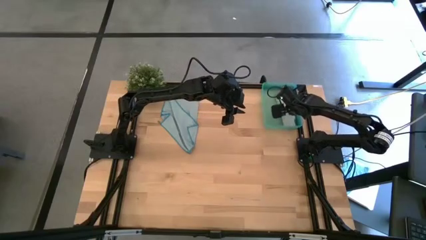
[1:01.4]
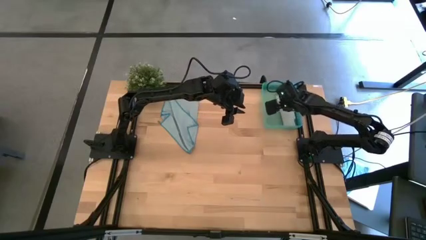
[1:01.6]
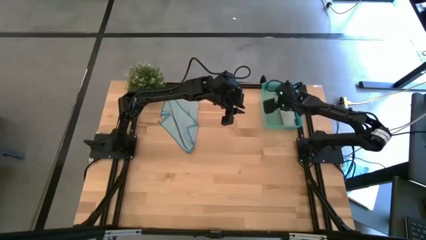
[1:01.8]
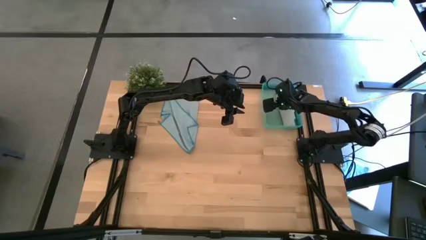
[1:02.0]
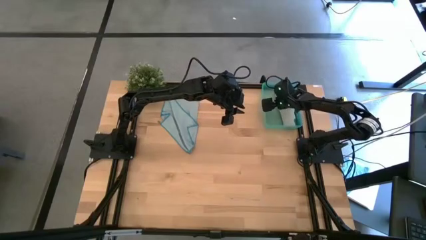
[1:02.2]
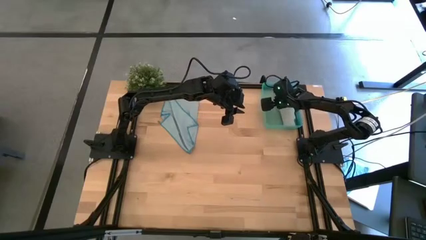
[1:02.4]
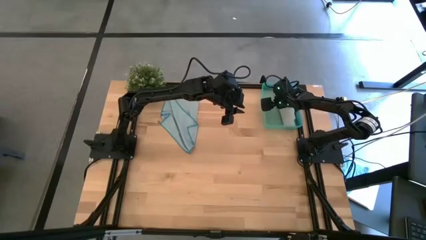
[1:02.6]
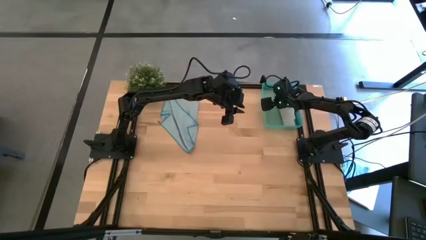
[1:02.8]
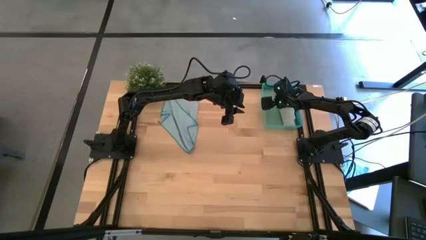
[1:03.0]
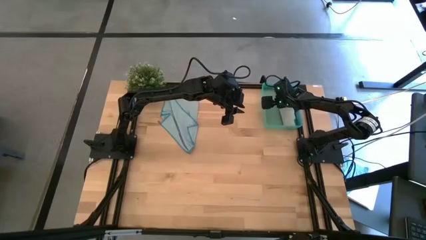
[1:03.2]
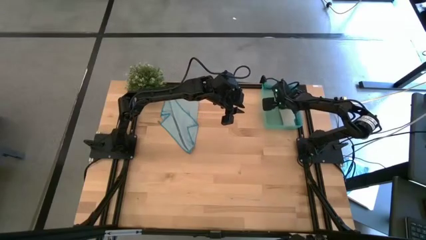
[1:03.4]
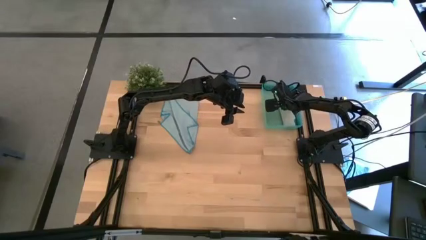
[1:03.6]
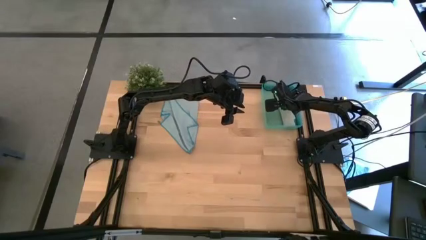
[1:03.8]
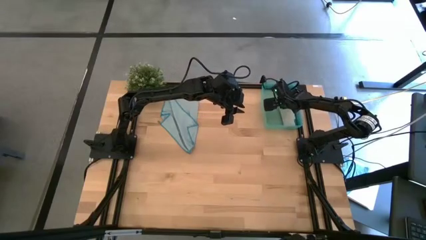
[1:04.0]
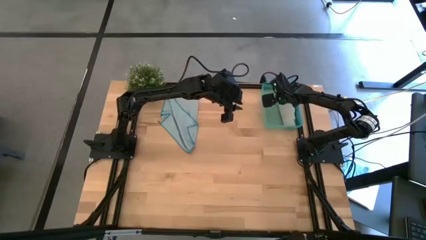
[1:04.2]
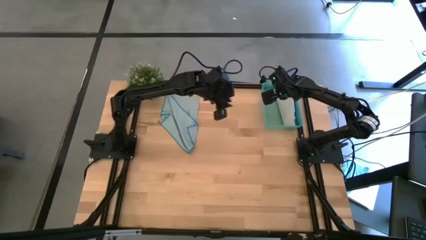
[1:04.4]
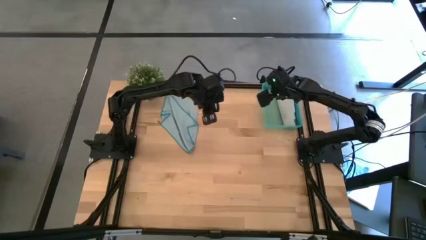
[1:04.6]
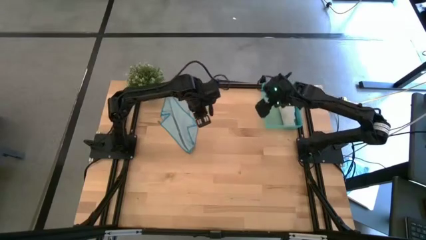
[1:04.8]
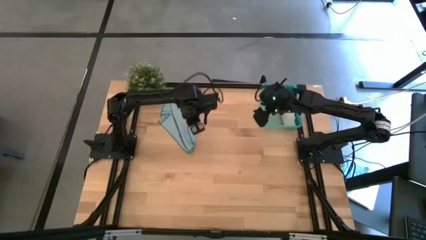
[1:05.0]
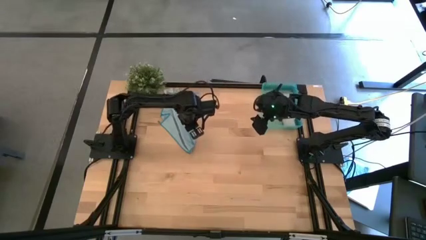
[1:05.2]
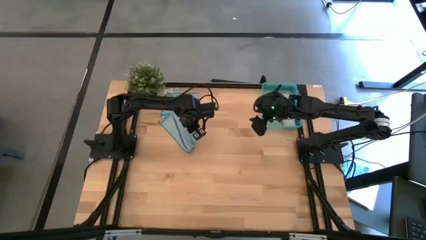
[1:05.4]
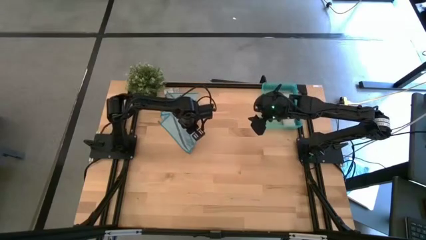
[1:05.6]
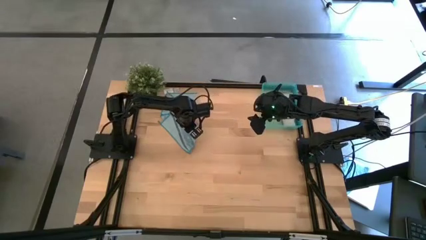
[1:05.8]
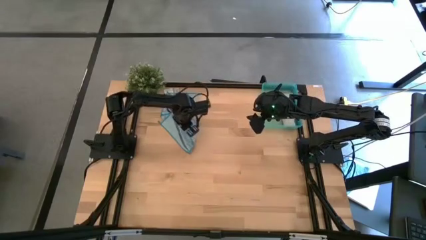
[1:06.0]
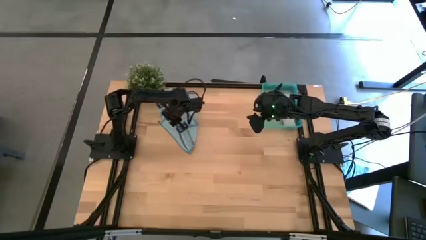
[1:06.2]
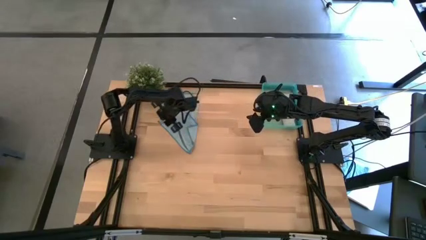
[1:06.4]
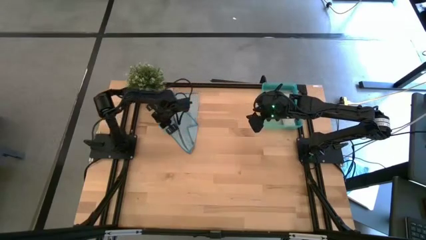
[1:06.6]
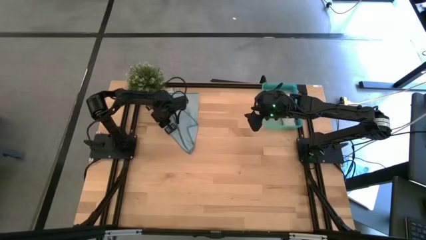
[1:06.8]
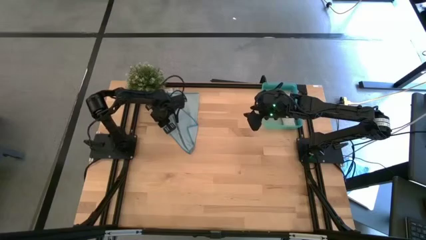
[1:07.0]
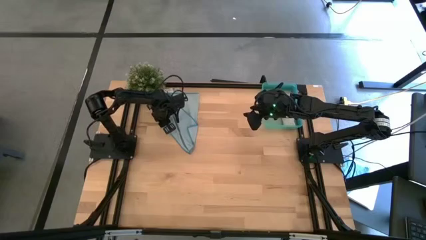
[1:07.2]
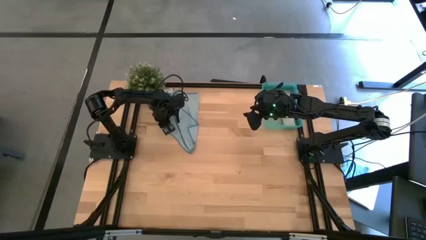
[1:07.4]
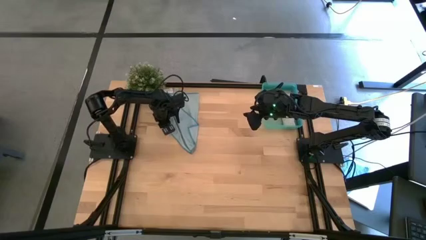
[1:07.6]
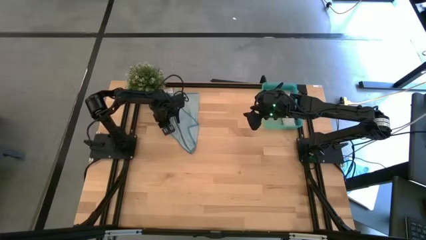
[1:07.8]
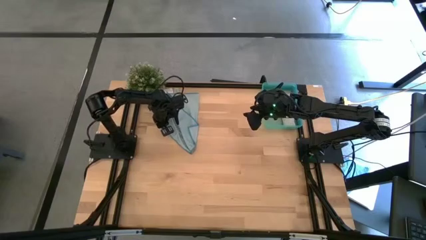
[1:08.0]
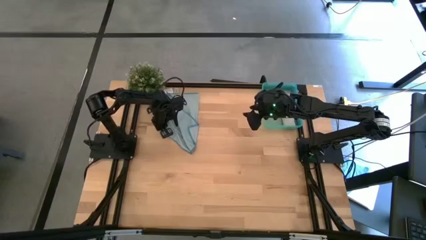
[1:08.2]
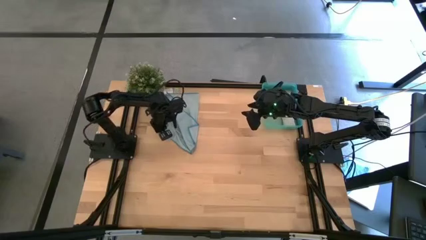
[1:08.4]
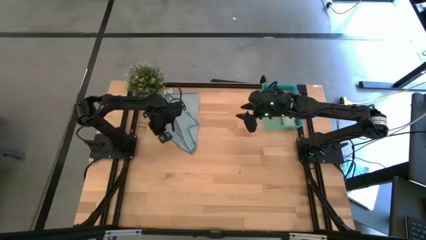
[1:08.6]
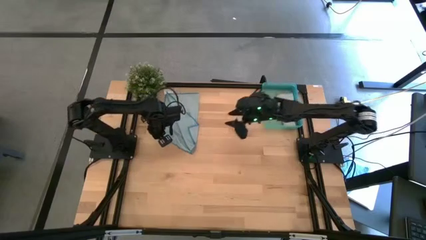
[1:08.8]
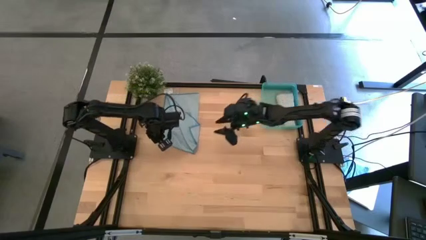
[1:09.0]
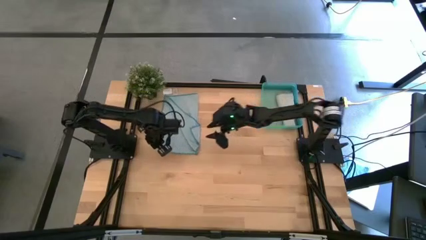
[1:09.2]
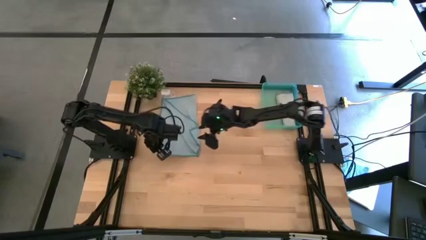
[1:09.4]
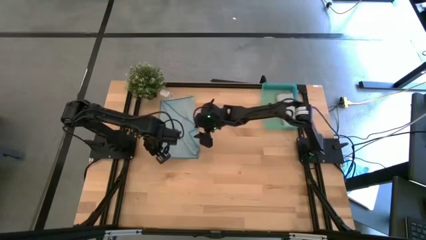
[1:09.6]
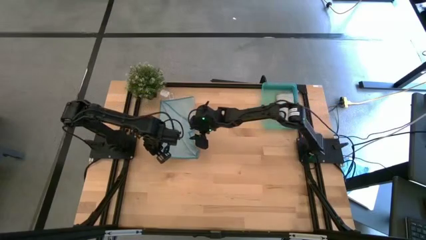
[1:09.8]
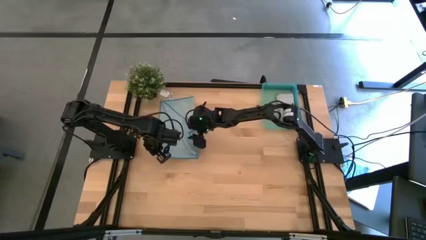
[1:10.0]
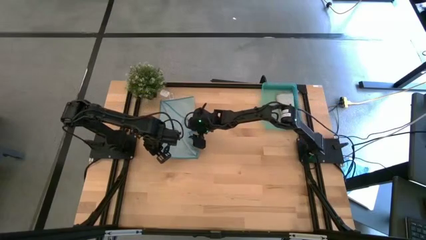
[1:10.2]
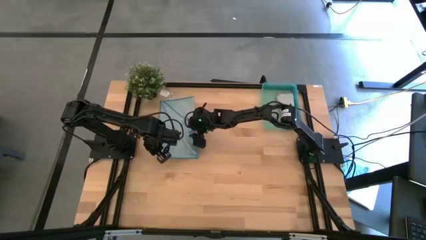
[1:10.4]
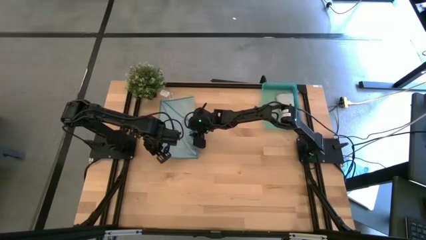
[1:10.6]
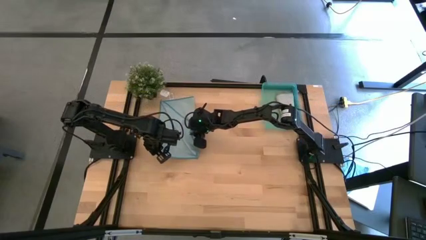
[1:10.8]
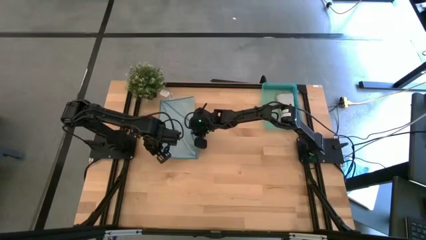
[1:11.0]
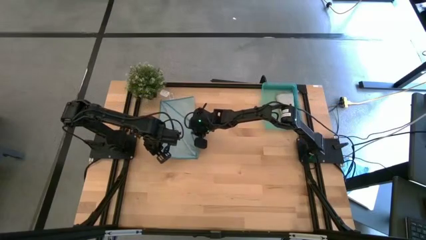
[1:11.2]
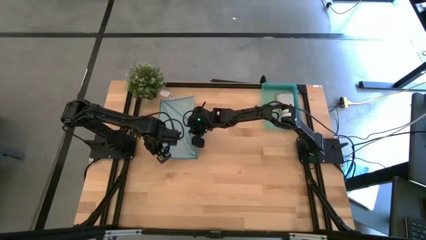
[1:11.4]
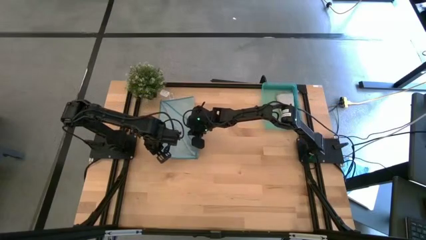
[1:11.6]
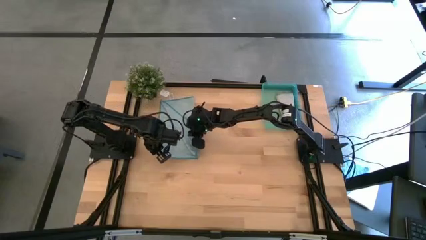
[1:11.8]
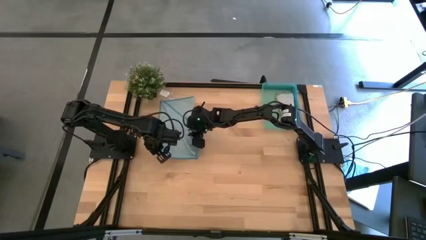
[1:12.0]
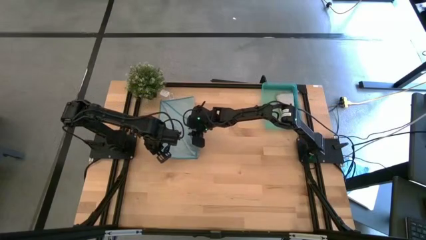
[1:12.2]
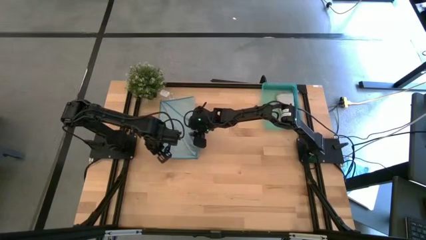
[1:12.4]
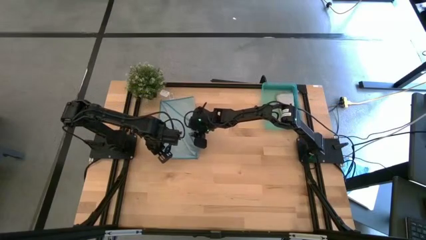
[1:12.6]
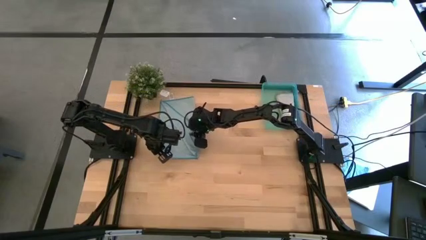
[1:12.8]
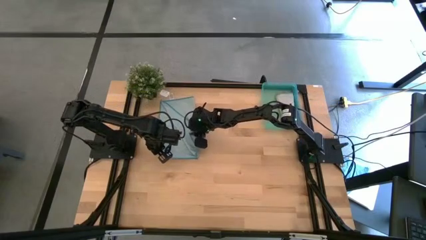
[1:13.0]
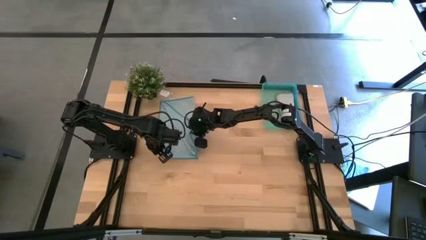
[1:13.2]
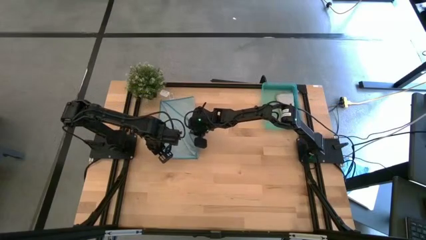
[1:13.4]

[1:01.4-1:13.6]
Task: Roll microfiber towels into tight, uniform cylinder then place into a basket
Fold the blue towel
